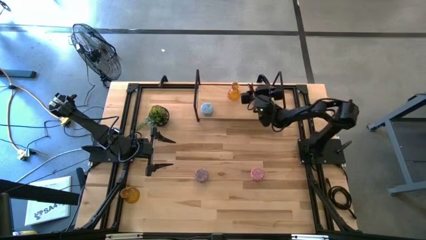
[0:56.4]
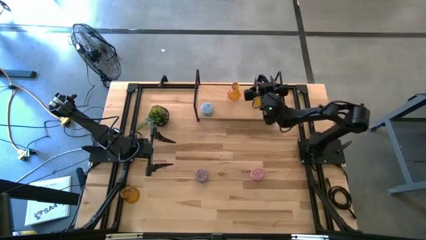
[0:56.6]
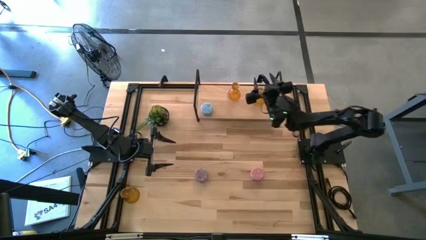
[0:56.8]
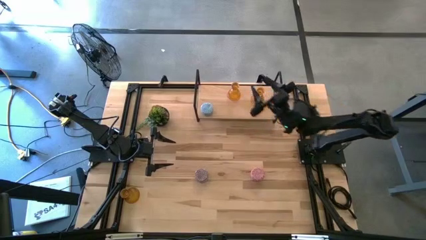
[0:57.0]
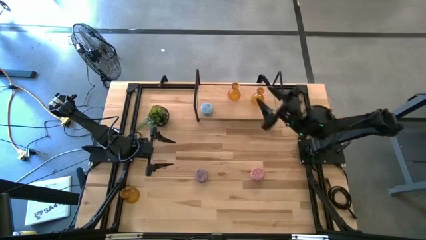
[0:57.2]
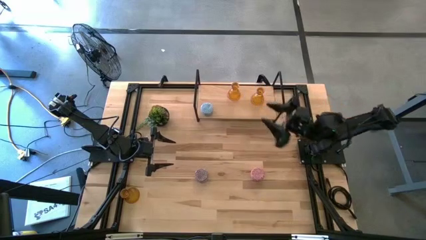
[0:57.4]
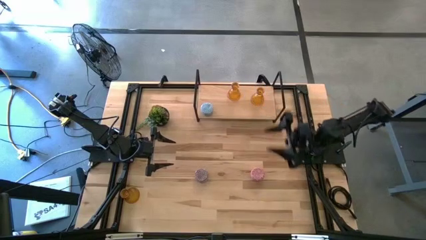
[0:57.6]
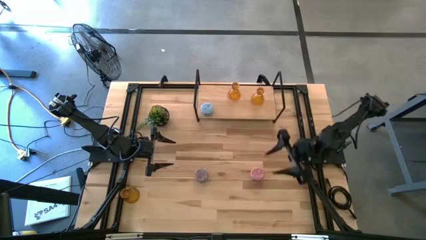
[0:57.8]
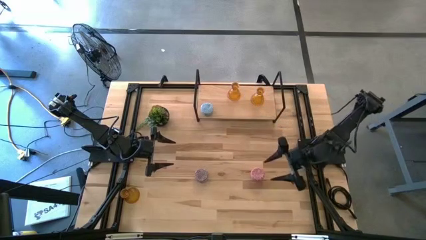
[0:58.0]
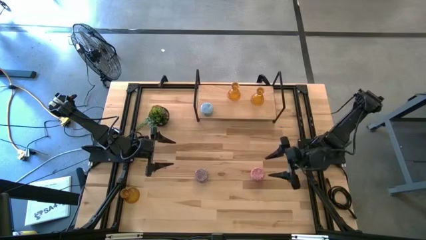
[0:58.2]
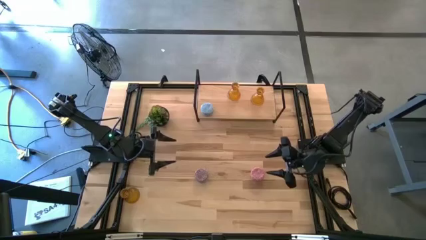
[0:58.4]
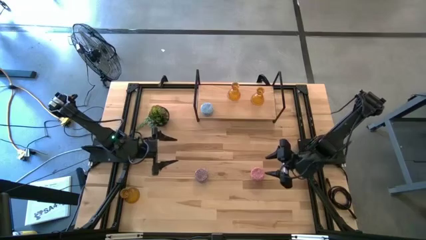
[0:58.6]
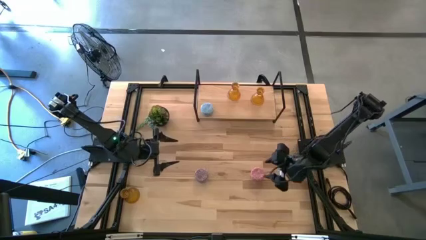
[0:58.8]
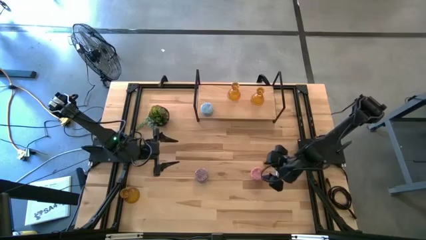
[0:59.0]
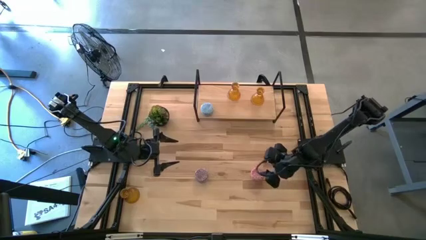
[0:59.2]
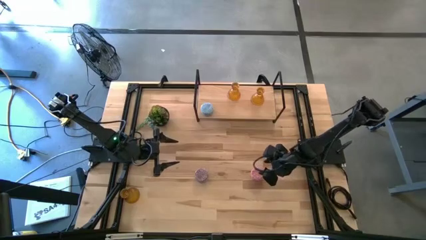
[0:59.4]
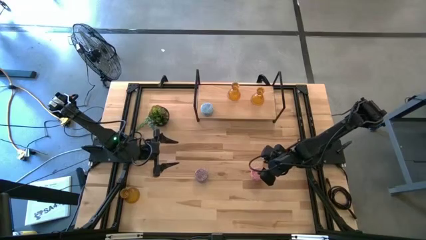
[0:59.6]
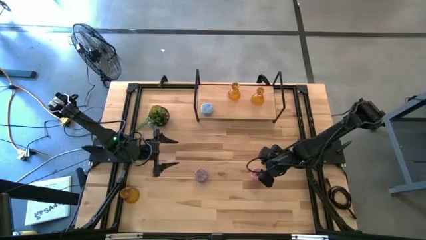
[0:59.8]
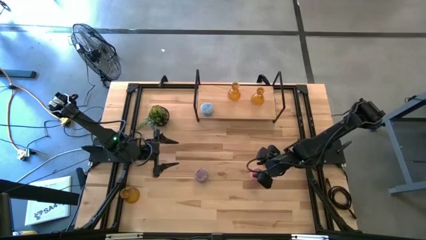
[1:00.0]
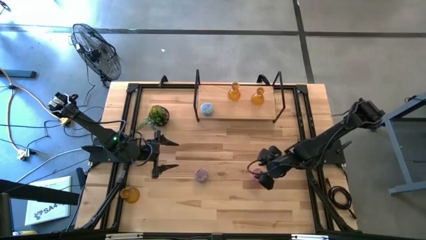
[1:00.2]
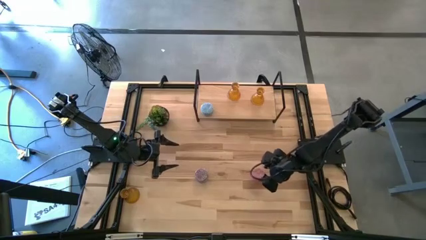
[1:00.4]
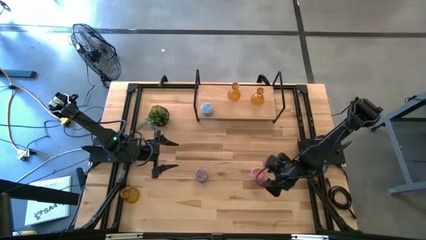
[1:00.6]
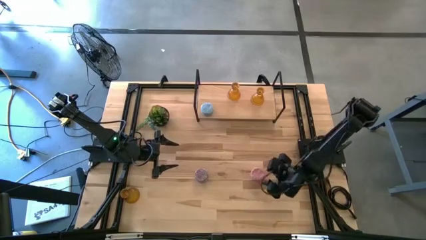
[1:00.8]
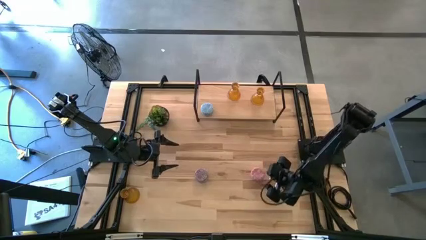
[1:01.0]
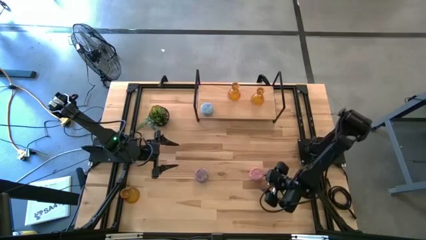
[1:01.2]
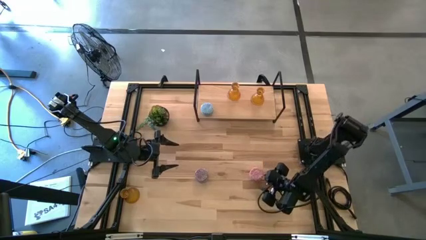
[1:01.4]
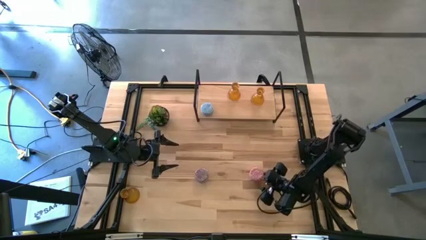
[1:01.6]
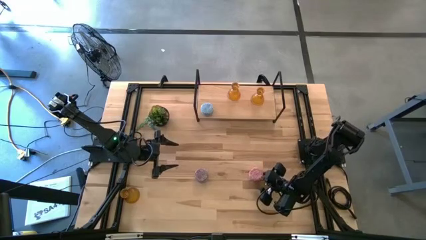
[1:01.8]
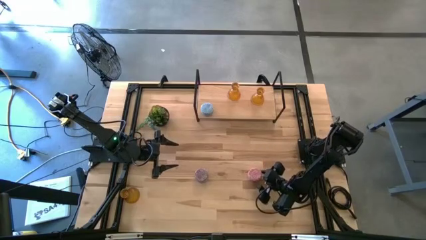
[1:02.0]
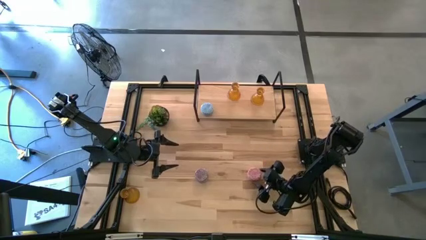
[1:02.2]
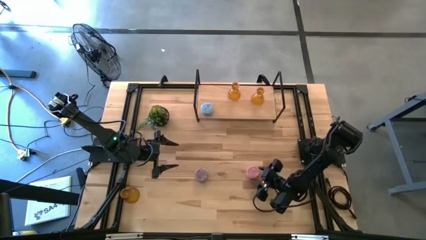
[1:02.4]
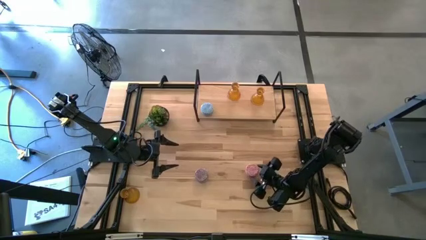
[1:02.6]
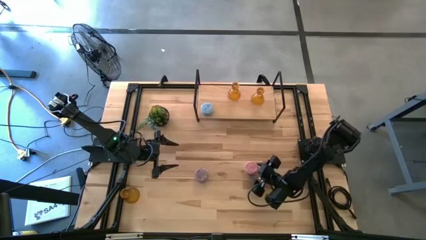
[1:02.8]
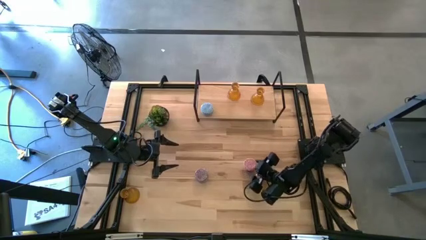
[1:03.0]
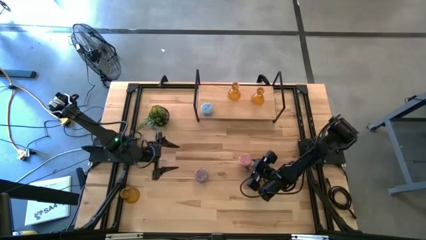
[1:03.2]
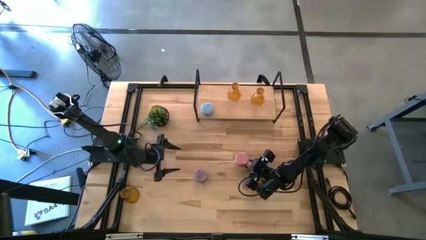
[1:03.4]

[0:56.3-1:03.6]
Task: Pick & Place candle stick holders
Put the pink scented candle on the shelf aligned with the blue scented candle

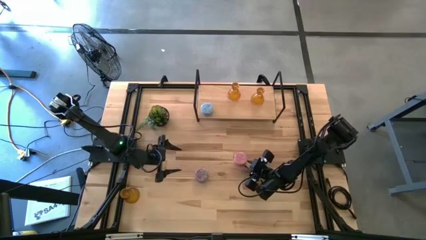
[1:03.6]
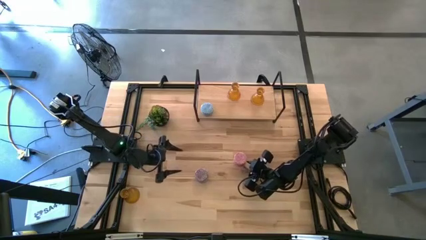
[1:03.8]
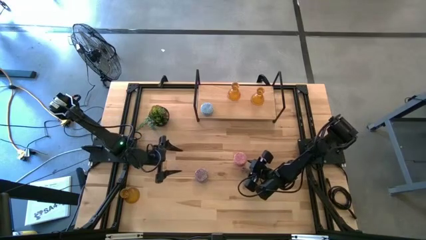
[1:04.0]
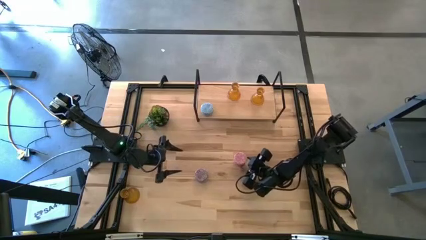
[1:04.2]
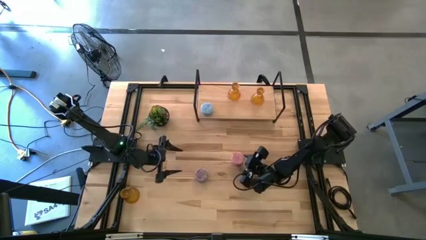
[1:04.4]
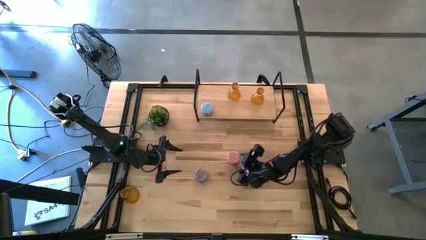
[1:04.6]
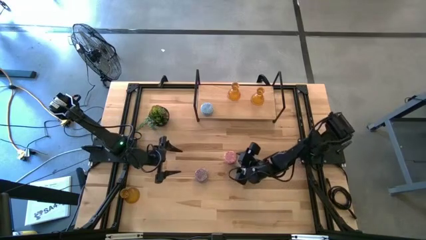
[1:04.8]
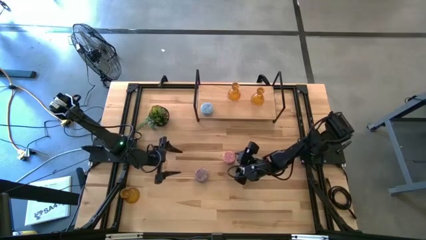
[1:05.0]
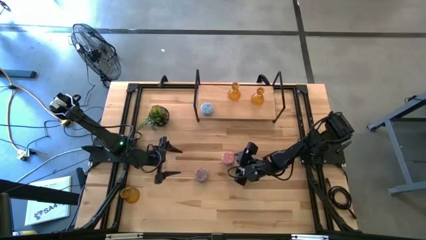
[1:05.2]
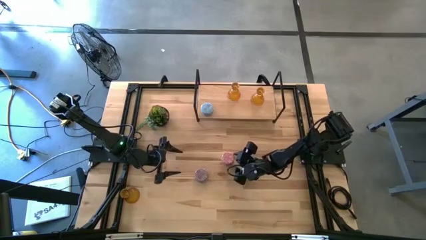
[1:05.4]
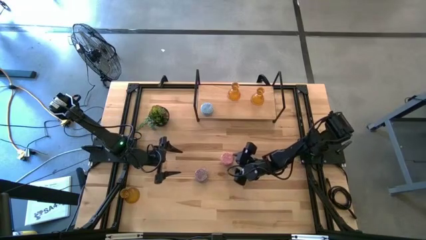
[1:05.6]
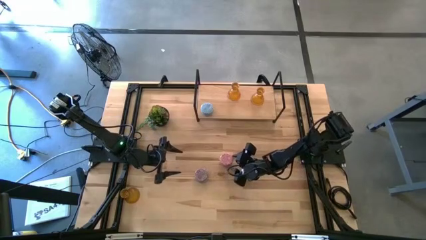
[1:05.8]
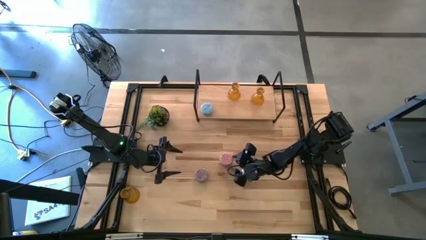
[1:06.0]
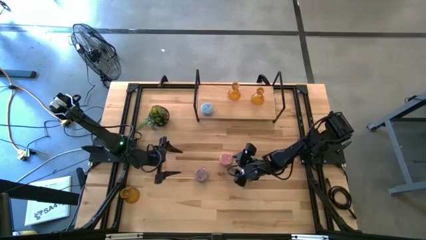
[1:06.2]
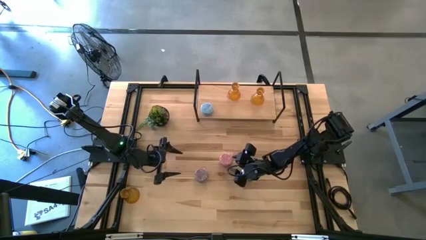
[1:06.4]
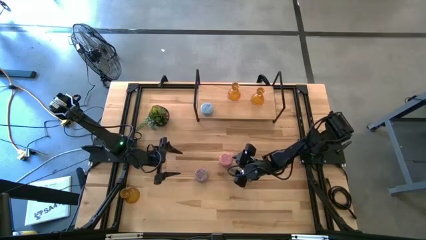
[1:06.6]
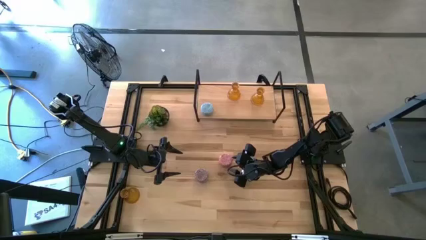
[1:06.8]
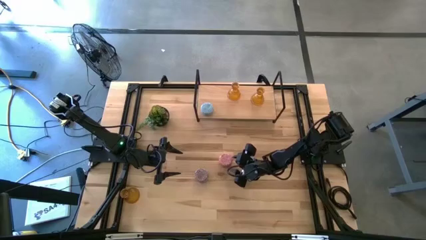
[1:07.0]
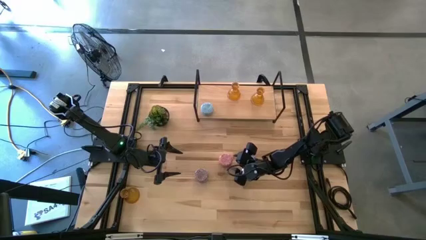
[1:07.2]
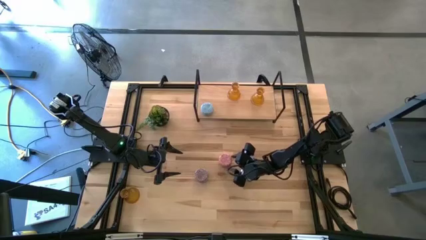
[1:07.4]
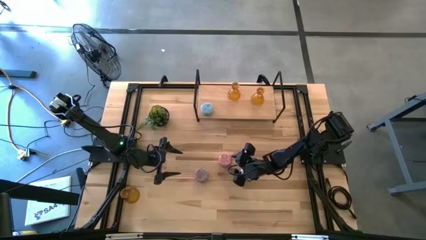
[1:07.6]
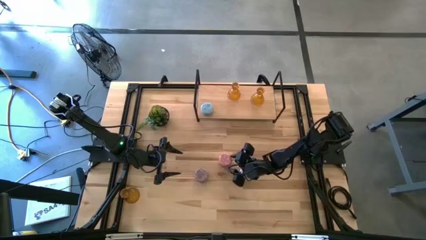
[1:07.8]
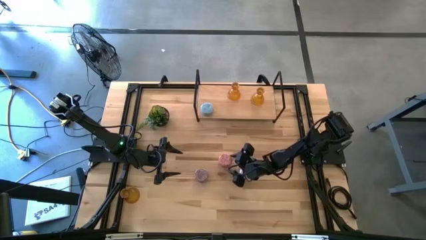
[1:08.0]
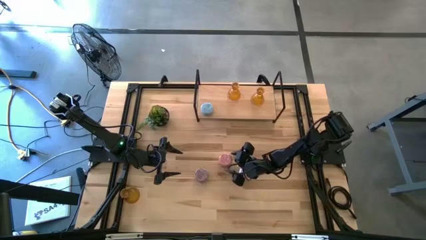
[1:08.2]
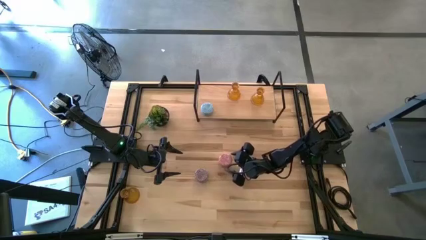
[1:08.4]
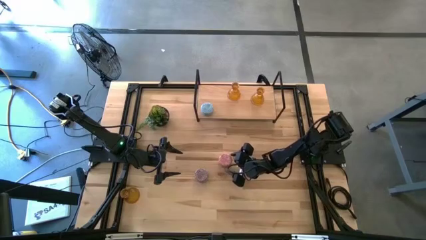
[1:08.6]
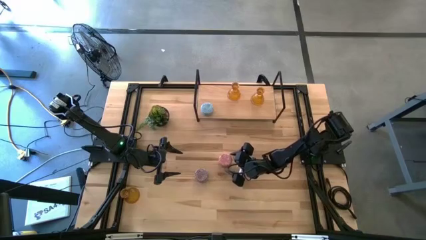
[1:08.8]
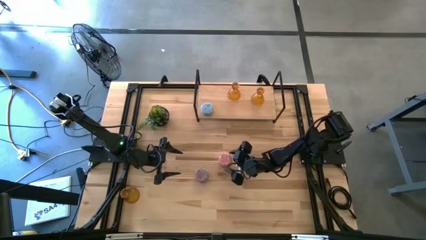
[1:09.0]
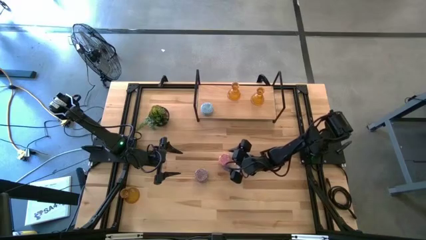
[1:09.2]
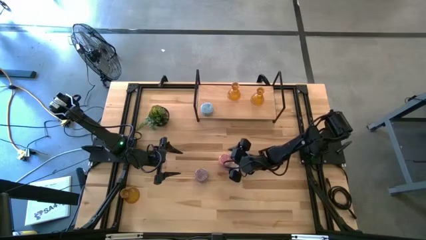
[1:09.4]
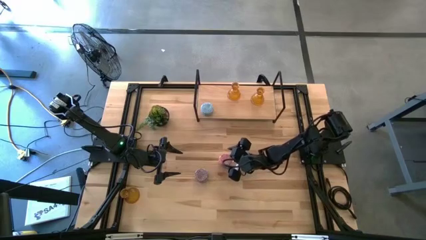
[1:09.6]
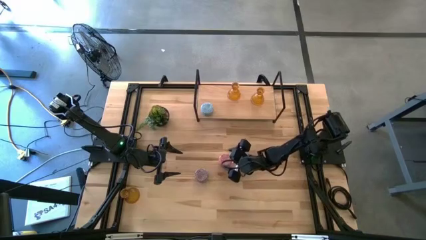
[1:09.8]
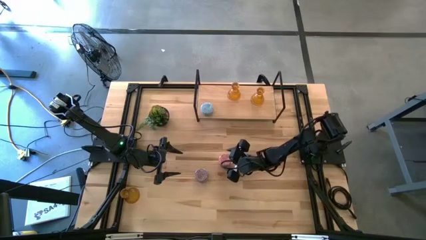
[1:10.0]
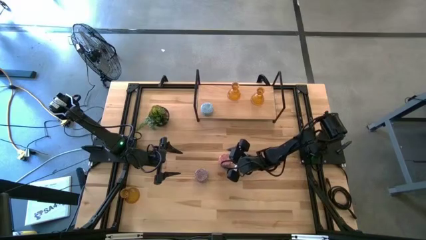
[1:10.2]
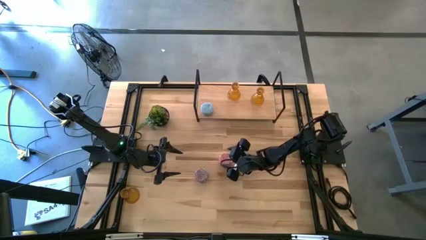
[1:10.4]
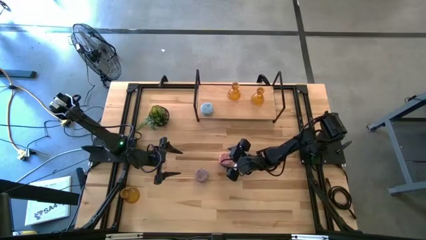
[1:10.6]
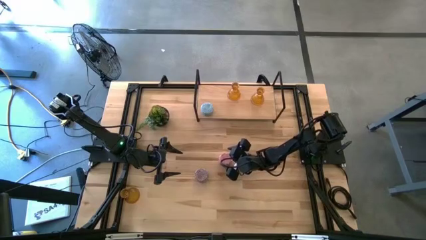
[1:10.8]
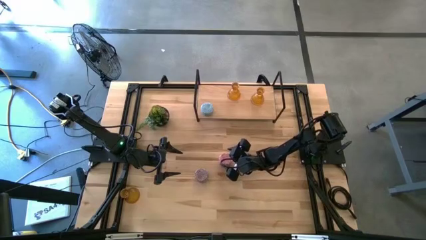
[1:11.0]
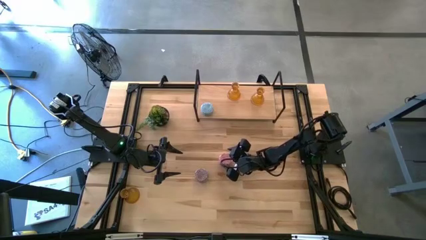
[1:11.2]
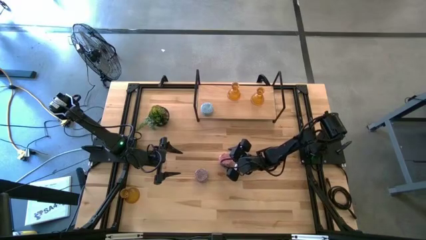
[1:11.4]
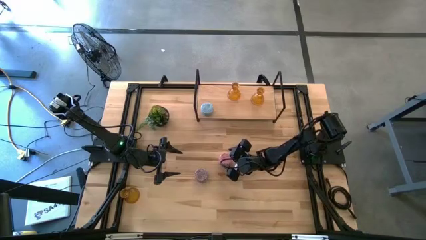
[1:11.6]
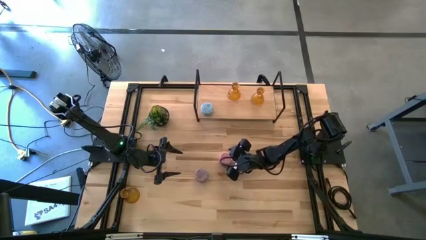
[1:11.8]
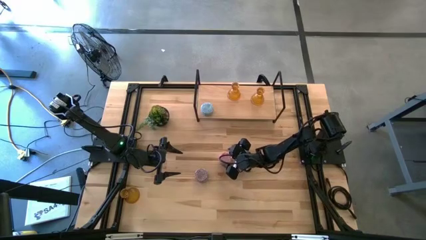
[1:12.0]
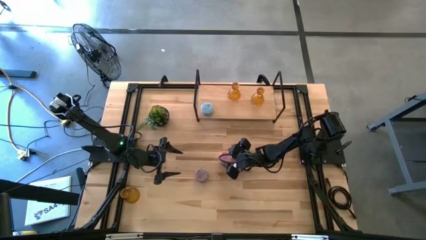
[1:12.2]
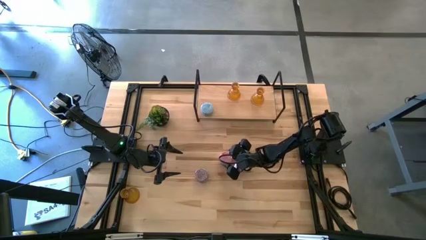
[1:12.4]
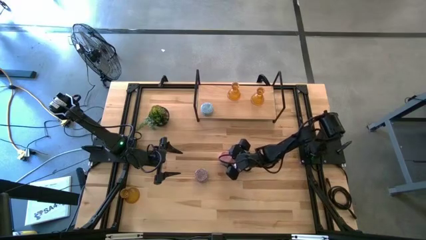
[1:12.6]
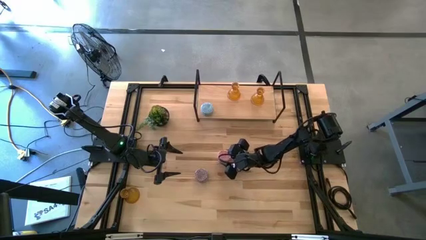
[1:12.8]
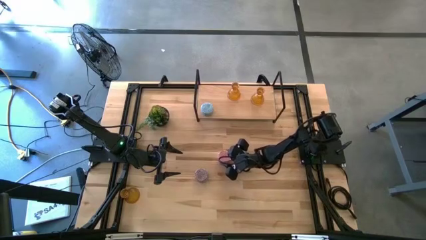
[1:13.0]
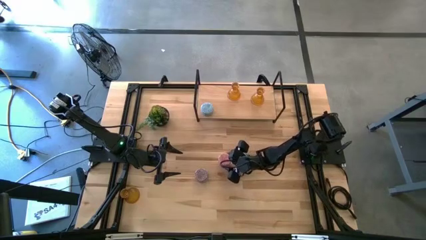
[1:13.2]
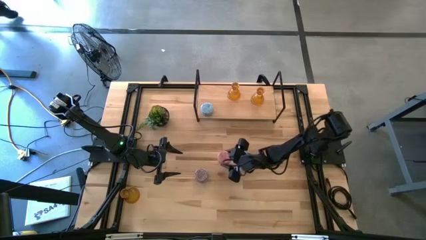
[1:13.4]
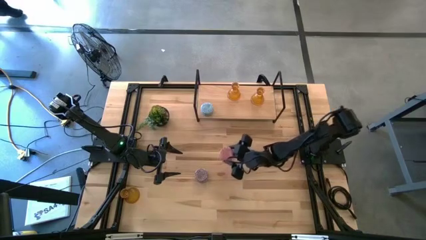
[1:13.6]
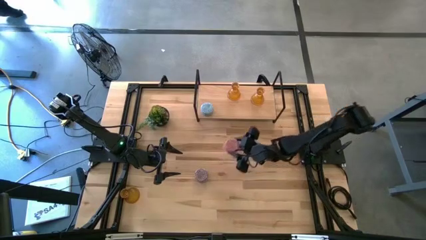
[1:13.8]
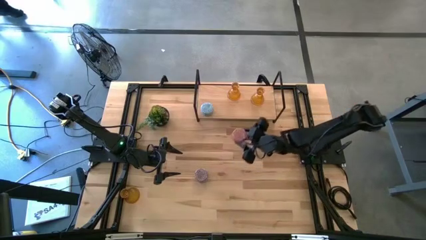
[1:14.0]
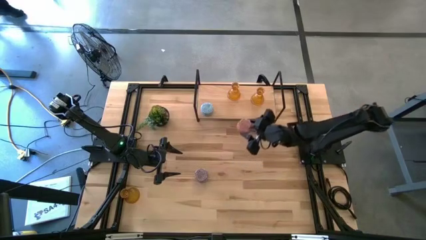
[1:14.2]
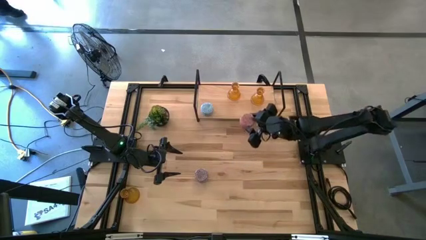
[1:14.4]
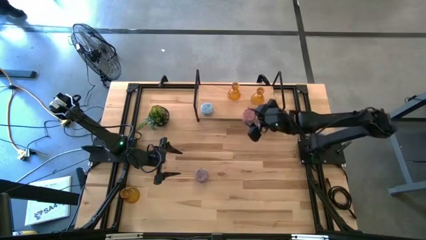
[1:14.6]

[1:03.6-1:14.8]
Put the pink scented candle on the shelf aligned with the blue scented candle
